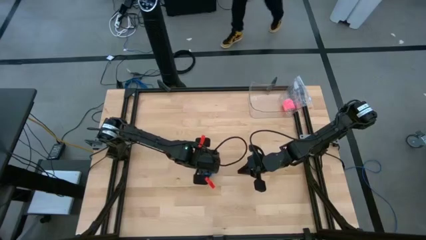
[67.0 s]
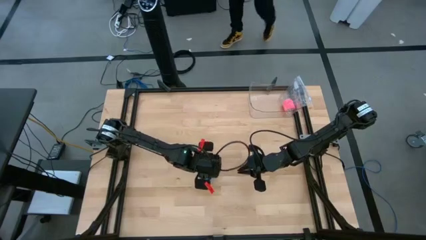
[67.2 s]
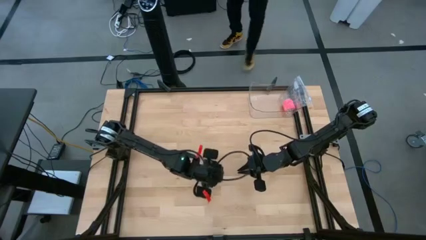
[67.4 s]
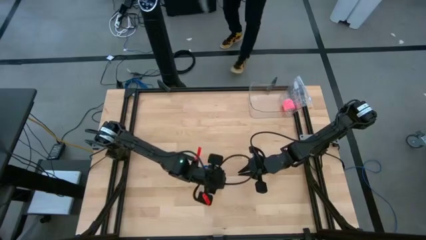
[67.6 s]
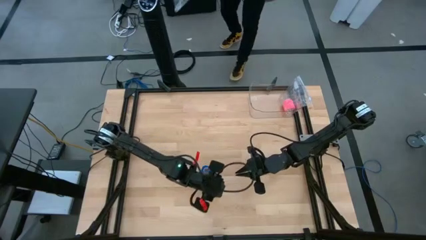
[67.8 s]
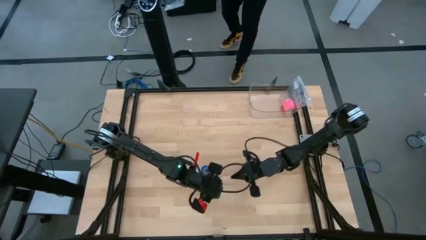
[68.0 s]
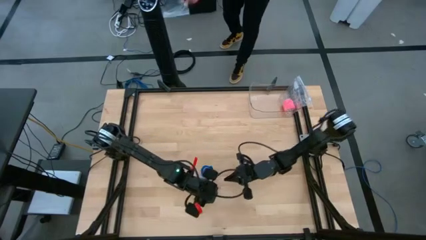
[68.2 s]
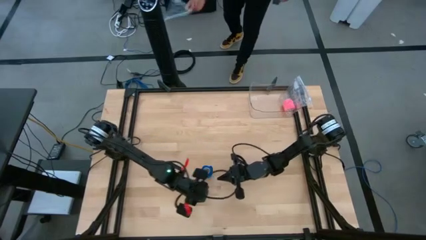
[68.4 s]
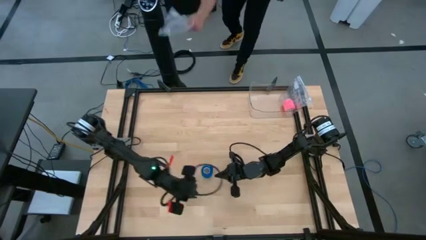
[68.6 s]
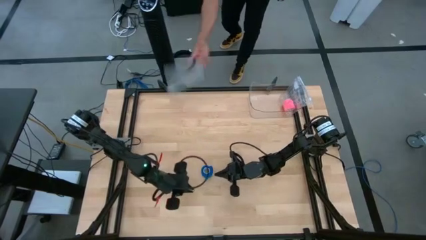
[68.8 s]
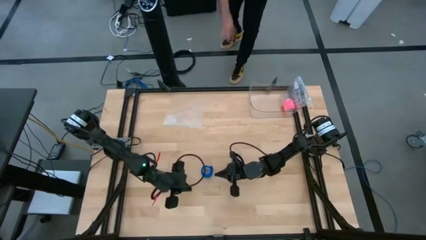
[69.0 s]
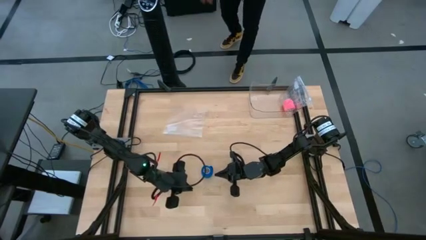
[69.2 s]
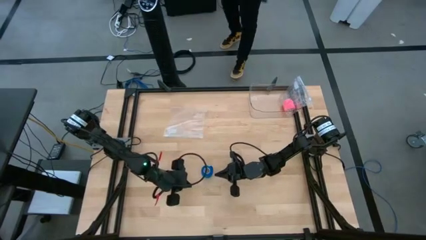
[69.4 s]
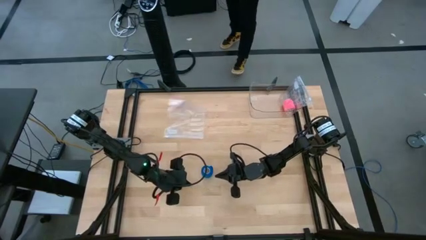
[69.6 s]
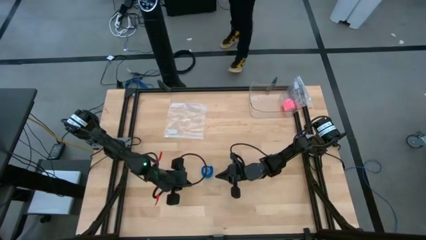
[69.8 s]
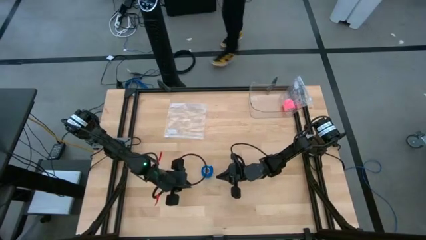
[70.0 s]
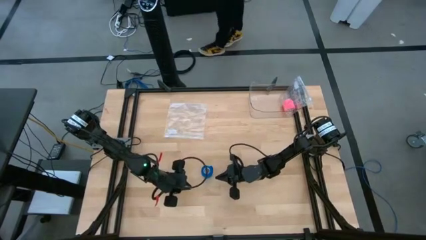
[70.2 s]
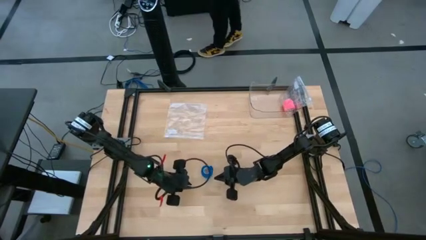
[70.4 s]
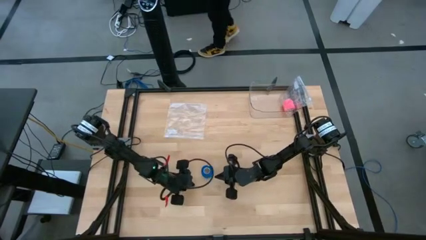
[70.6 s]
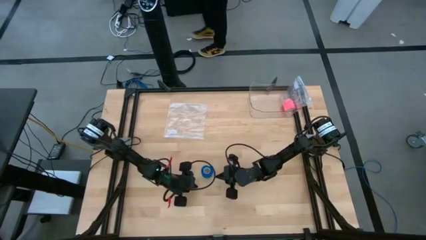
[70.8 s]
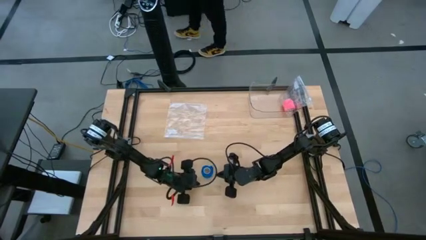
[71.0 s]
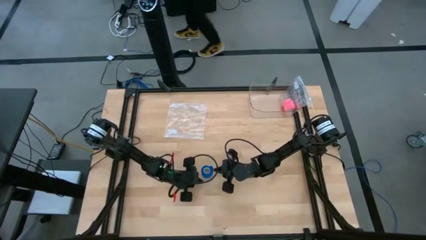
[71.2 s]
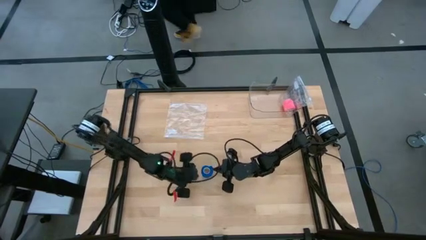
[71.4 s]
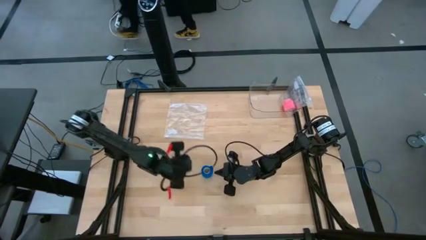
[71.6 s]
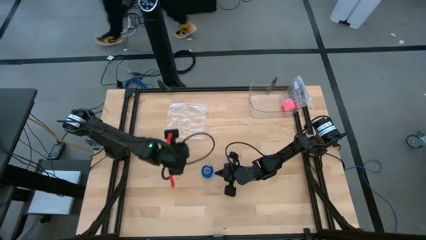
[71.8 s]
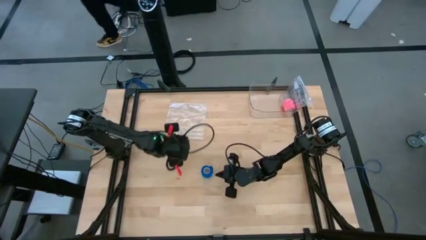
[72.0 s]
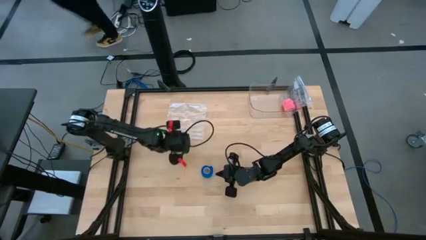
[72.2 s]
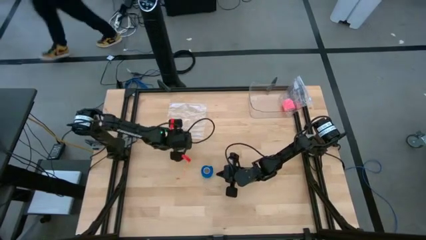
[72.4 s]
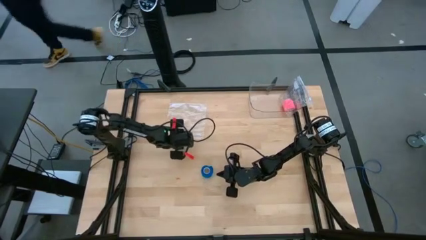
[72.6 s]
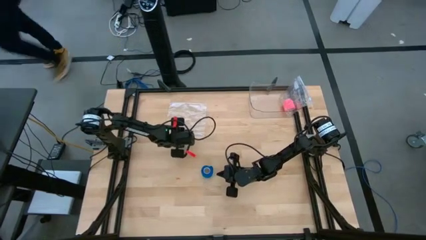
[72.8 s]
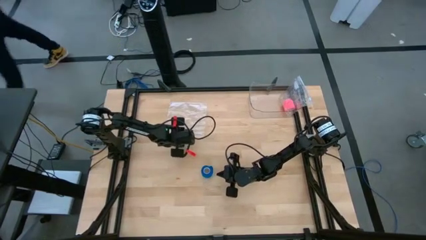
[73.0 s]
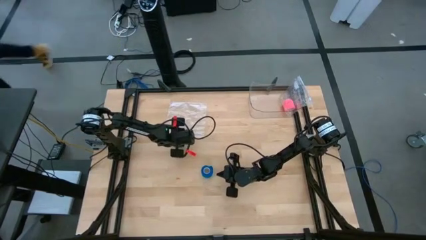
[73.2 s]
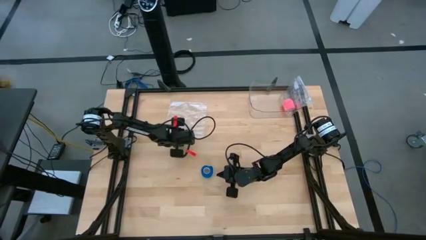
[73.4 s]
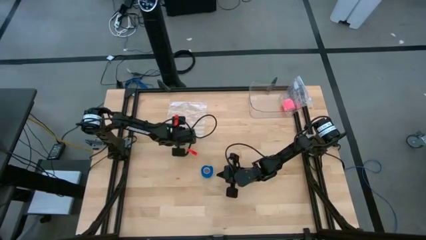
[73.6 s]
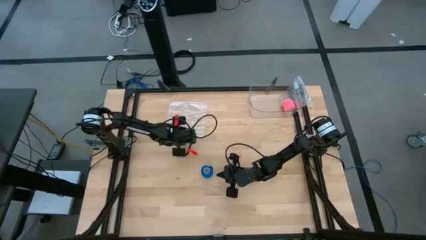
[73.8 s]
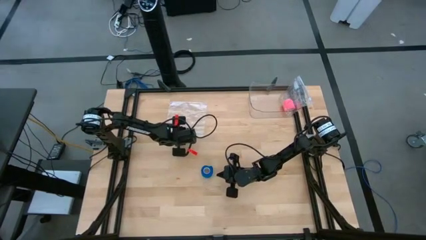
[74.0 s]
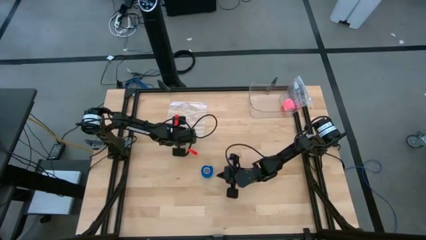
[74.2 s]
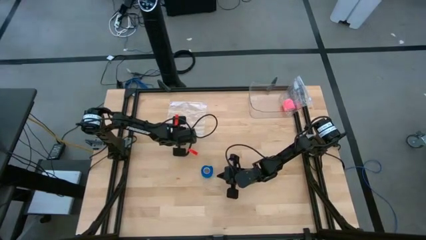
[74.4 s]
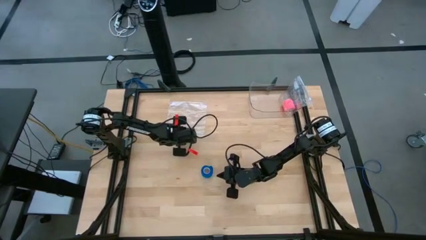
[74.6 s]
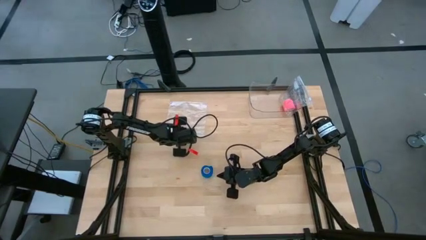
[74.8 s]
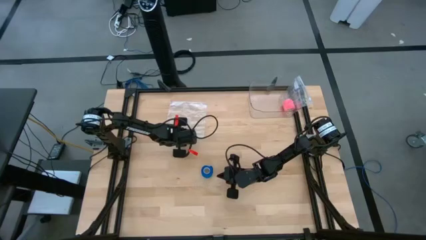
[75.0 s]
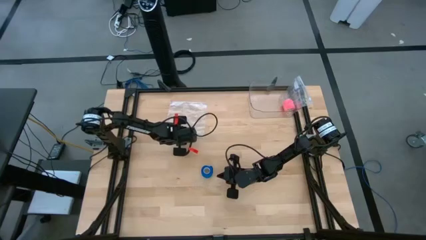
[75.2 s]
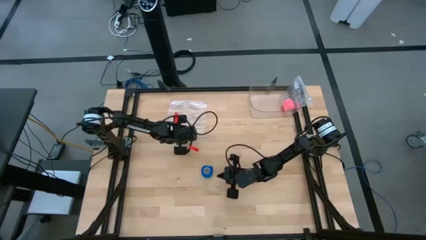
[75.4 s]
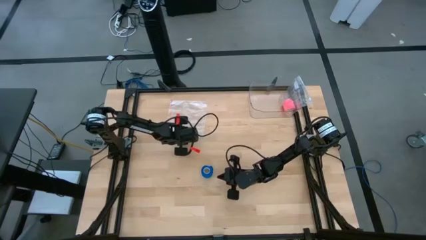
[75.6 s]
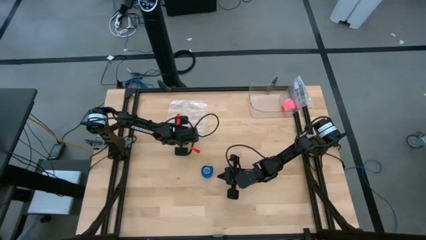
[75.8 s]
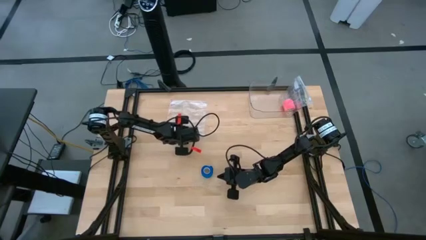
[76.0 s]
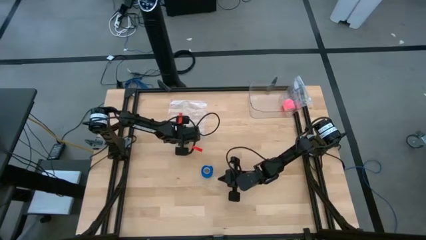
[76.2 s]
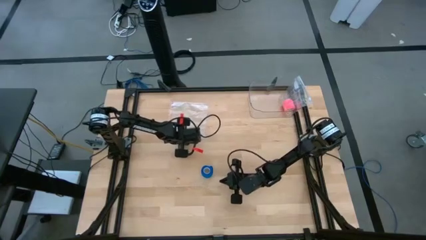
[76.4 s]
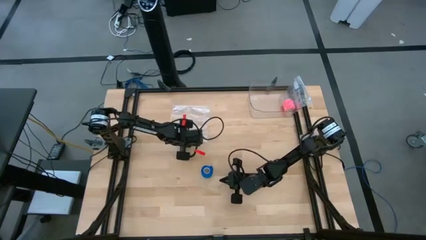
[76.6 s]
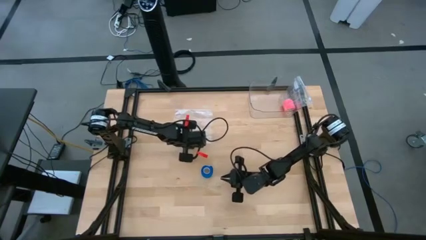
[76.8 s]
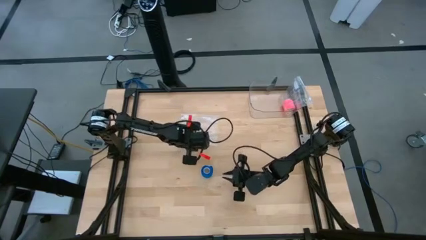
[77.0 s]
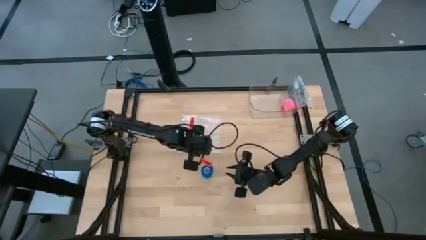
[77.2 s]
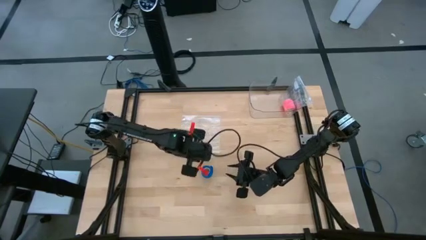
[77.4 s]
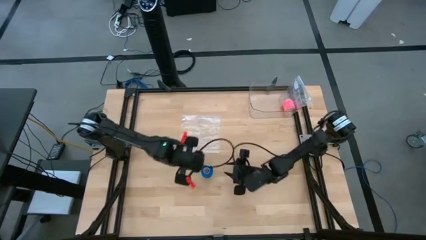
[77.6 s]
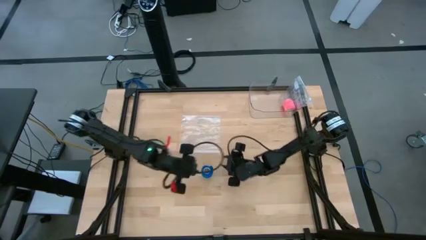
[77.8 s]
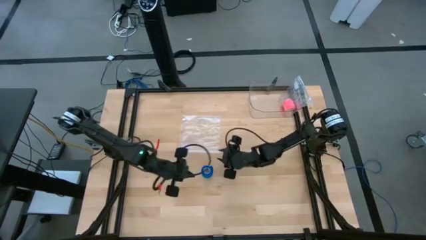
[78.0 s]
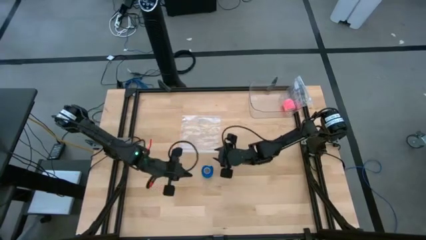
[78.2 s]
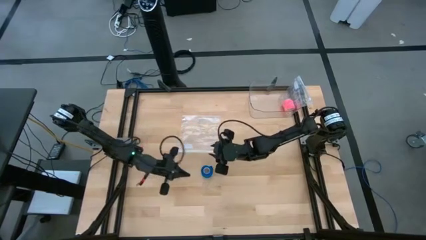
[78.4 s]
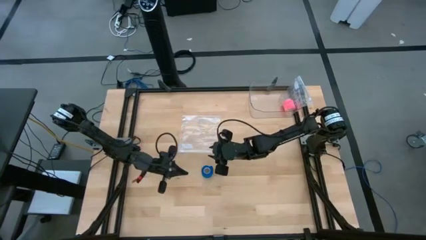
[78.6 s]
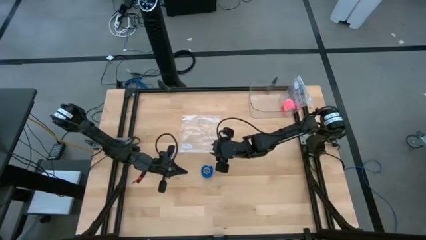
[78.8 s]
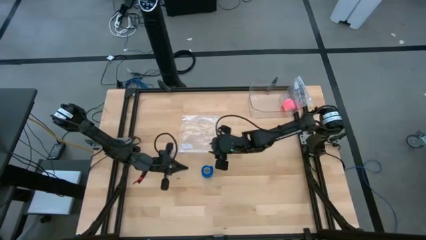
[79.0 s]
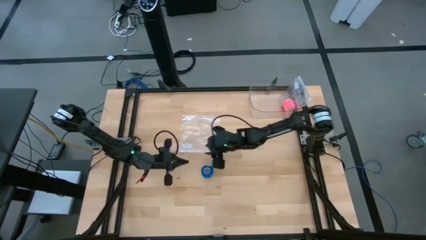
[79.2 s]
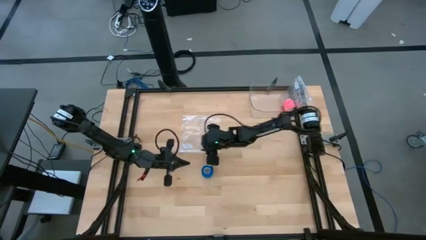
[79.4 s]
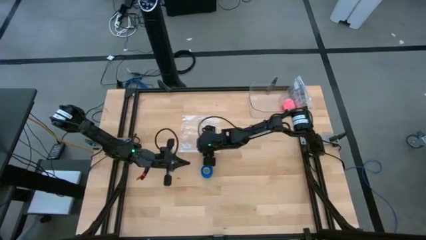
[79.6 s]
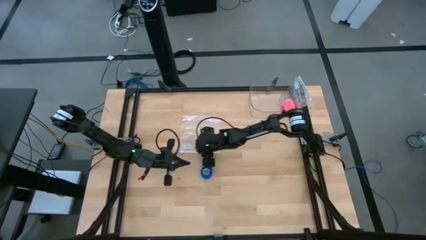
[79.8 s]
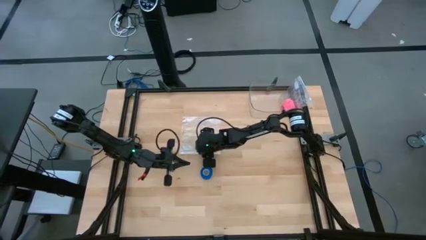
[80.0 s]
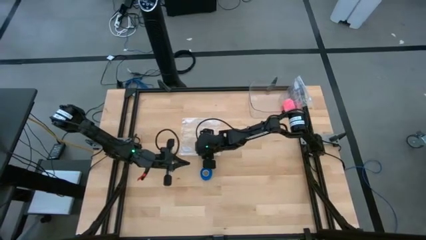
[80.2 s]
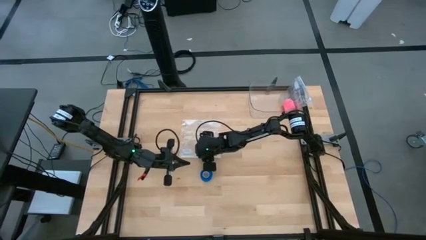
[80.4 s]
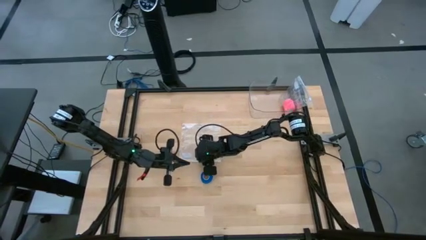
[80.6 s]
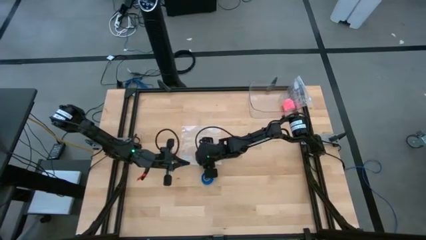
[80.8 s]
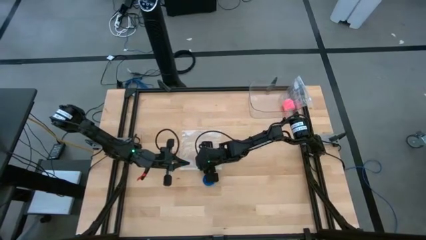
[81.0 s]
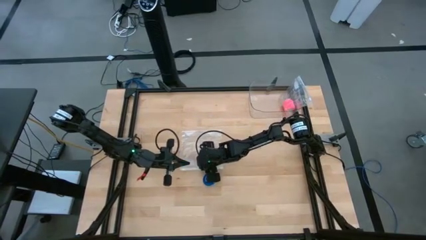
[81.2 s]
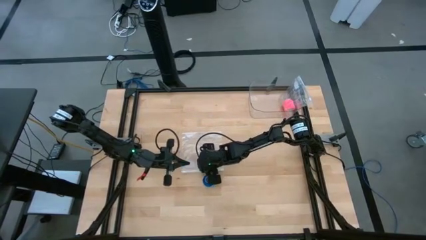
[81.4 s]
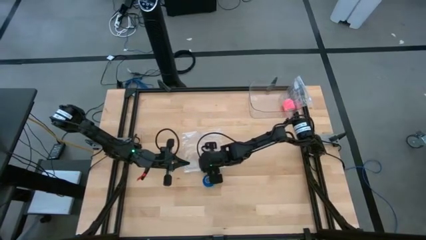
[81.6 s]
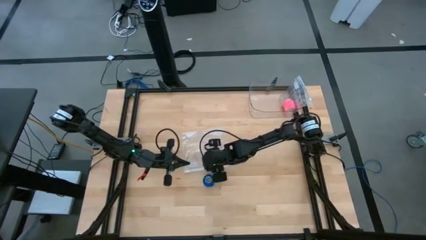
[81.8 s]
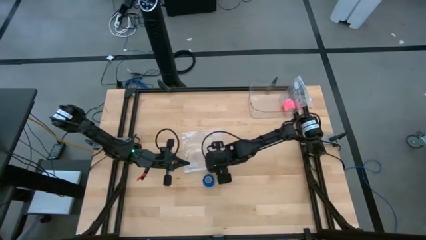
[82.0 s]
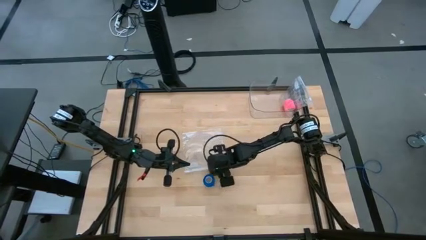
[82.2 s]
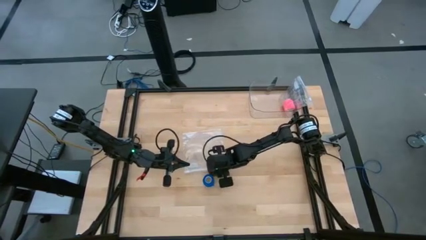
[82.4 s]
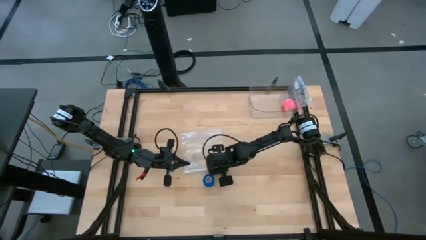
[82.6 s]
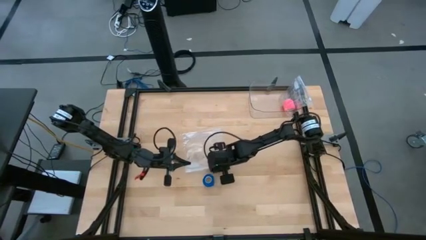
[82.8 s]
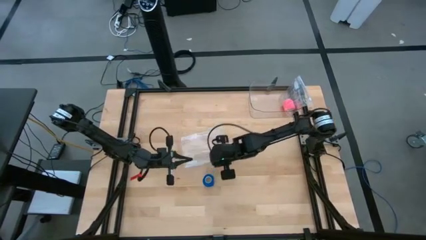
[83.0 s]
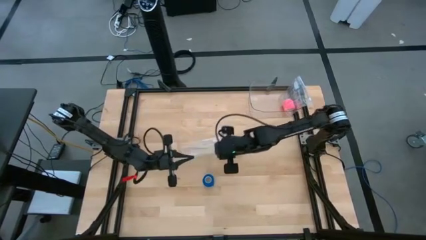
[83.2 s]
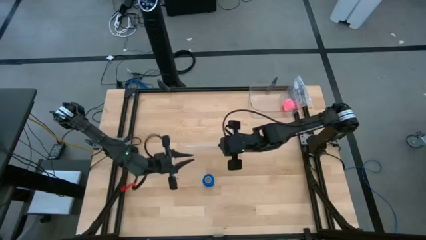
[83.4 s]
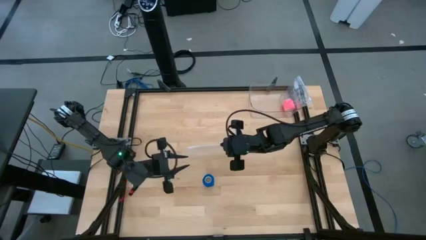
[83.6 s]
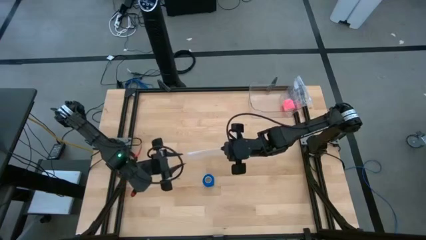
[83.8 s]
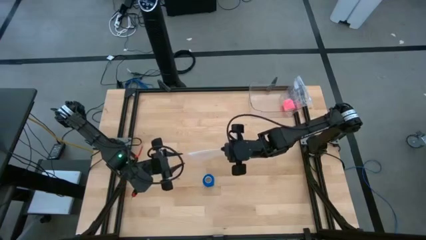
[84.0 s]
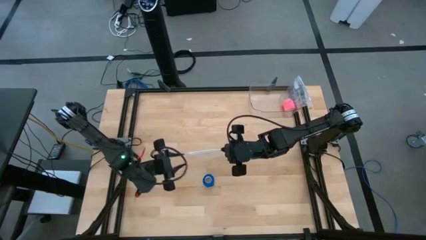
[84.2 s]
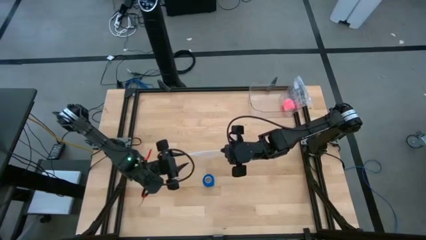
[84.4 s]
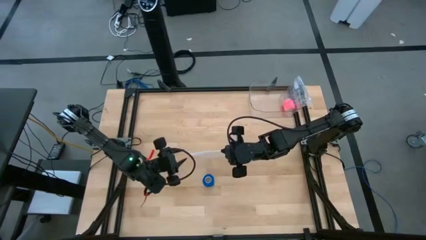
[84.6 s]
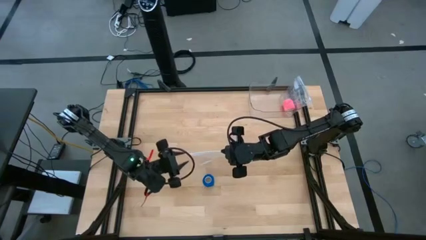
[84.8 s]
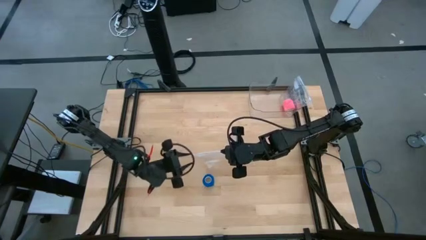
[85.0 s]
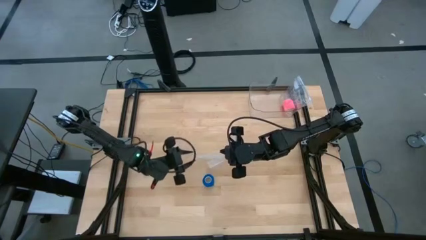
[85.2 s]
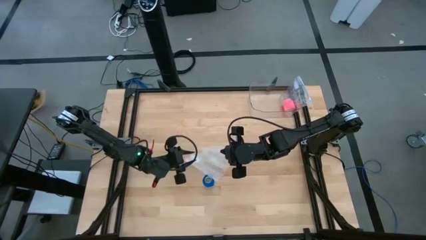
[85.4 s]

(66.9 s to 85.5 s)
Task: Roll bandage
Open the transparent zip bag
